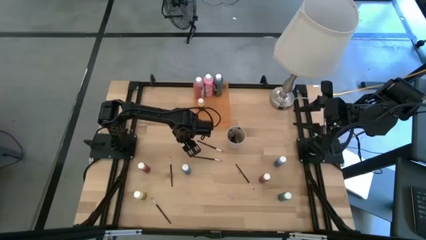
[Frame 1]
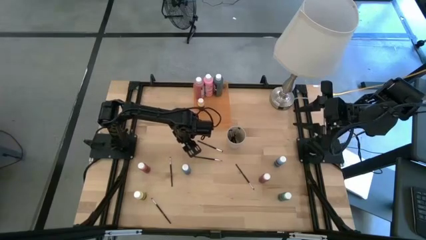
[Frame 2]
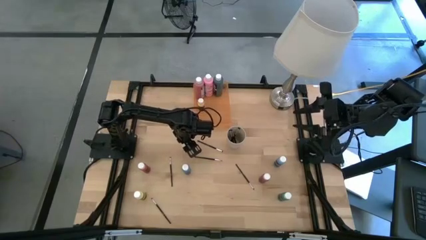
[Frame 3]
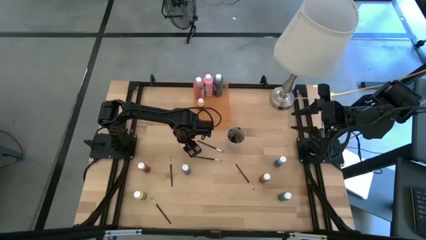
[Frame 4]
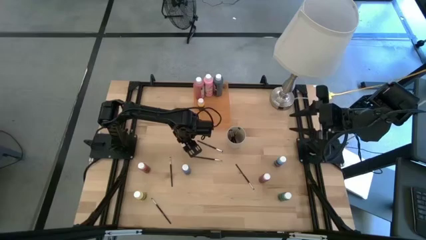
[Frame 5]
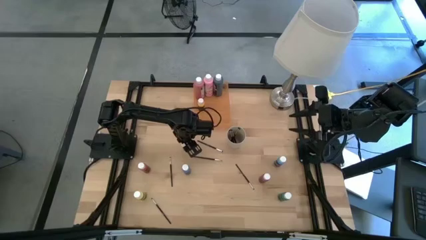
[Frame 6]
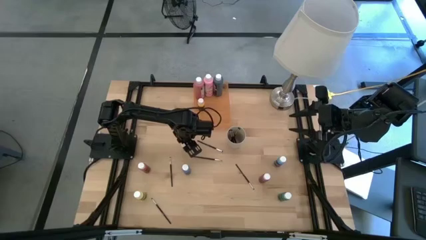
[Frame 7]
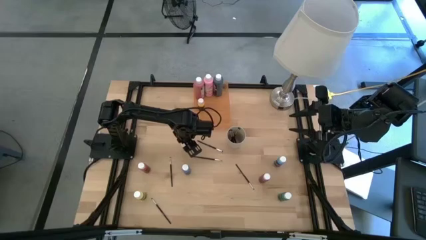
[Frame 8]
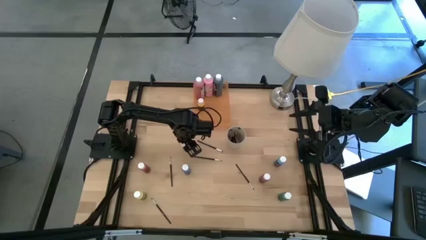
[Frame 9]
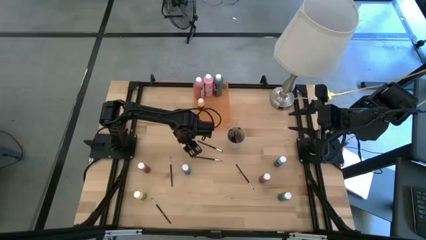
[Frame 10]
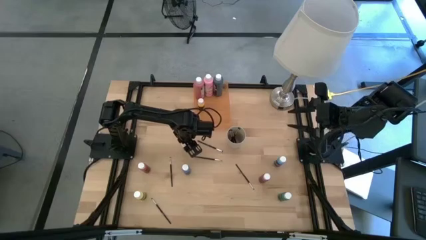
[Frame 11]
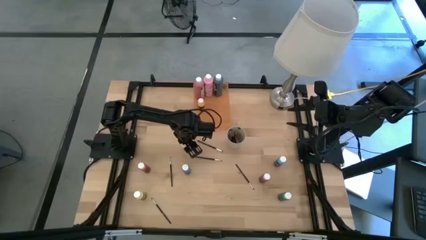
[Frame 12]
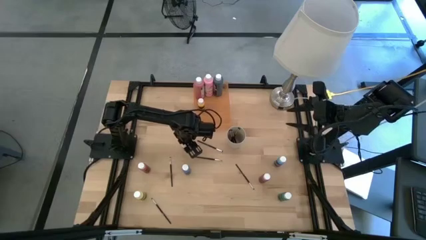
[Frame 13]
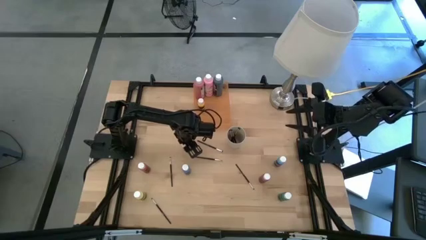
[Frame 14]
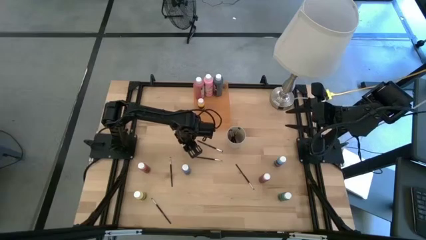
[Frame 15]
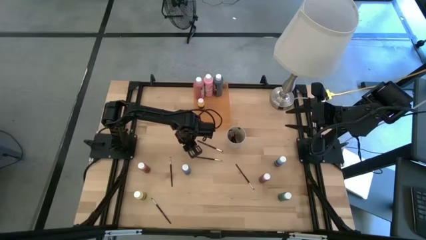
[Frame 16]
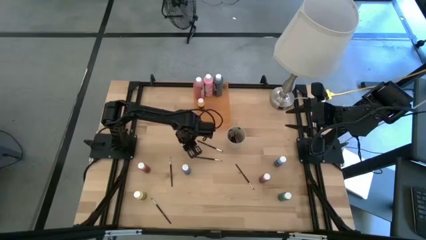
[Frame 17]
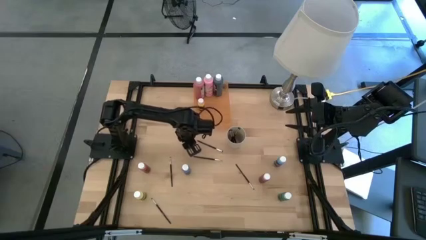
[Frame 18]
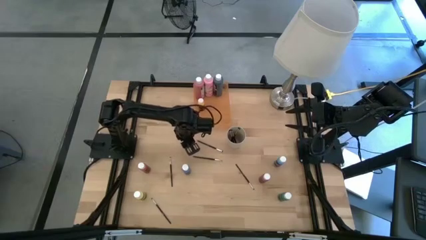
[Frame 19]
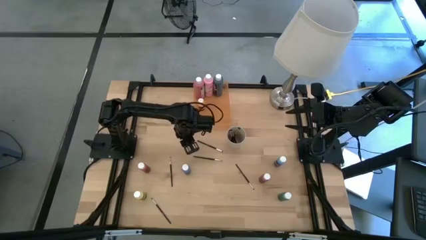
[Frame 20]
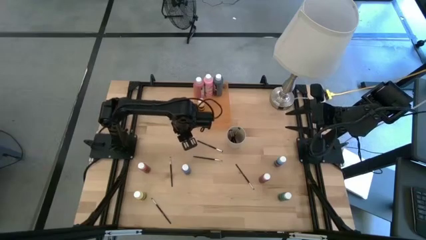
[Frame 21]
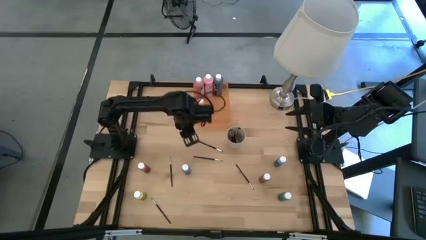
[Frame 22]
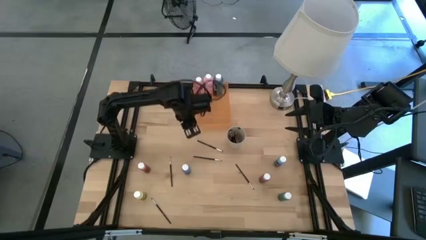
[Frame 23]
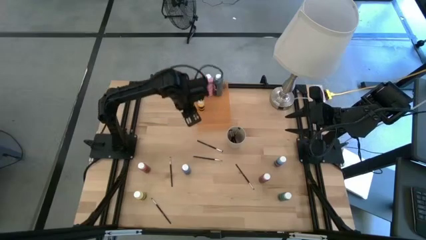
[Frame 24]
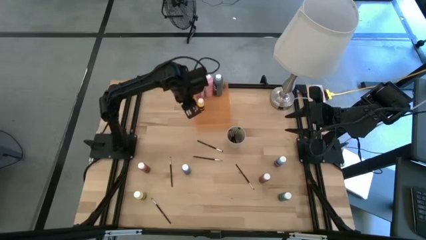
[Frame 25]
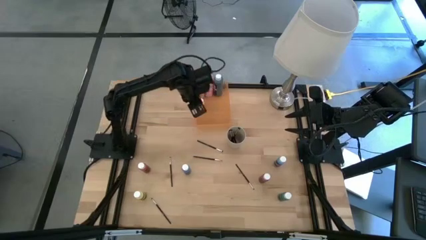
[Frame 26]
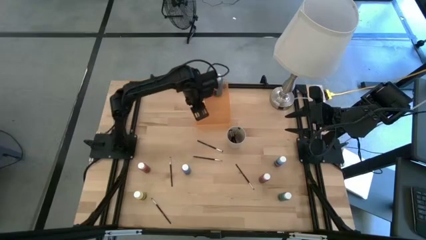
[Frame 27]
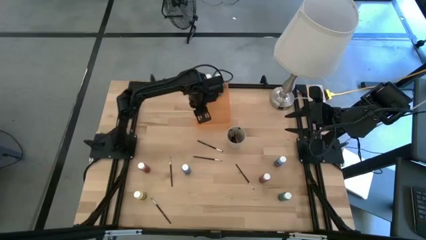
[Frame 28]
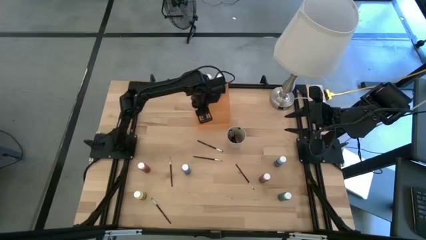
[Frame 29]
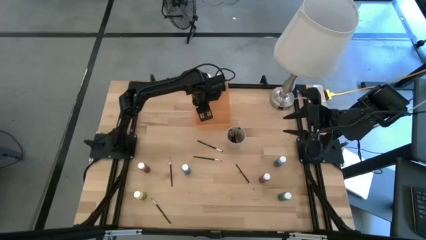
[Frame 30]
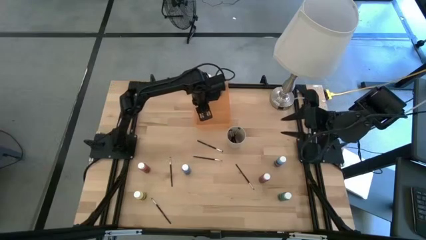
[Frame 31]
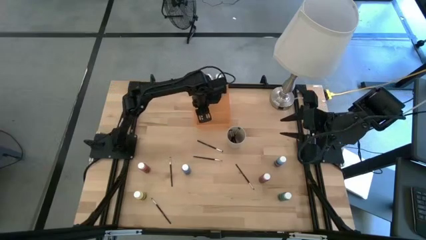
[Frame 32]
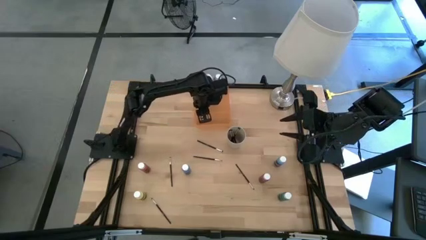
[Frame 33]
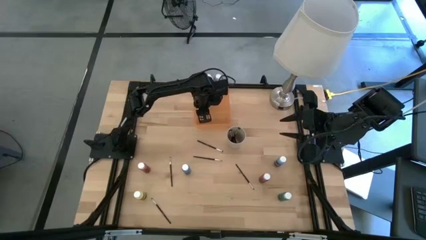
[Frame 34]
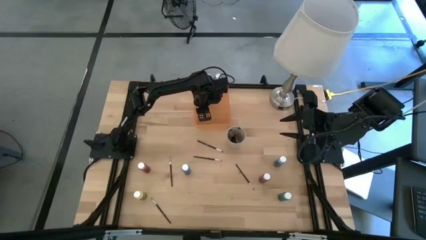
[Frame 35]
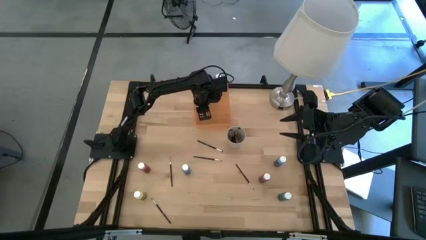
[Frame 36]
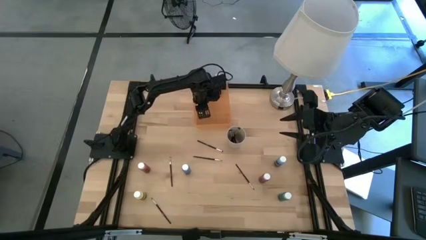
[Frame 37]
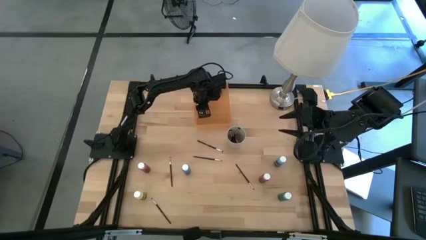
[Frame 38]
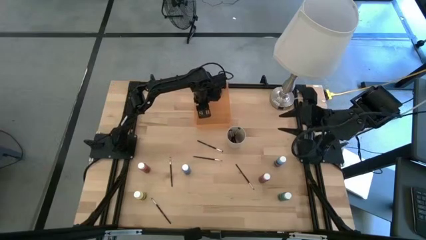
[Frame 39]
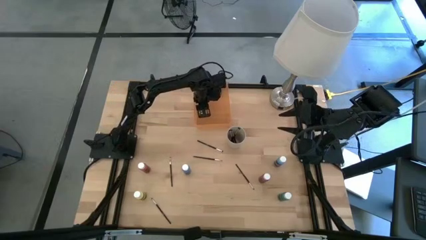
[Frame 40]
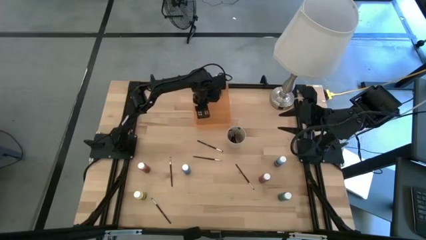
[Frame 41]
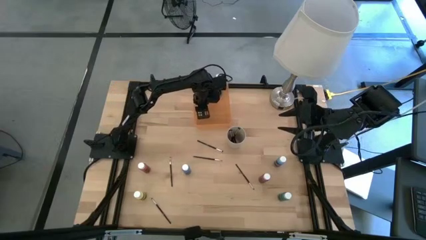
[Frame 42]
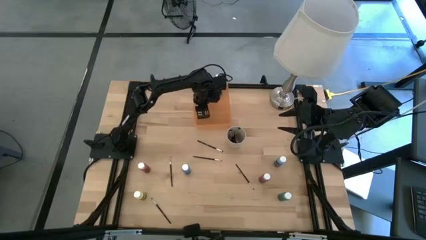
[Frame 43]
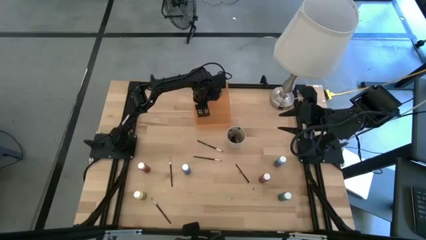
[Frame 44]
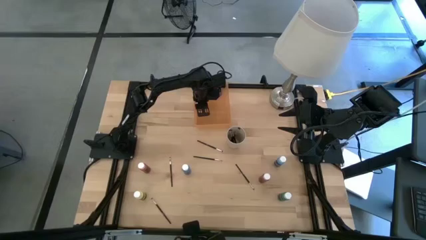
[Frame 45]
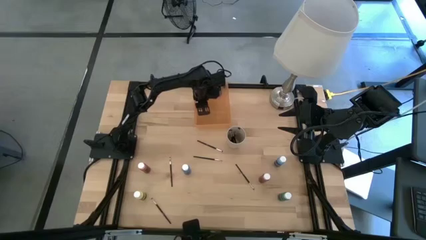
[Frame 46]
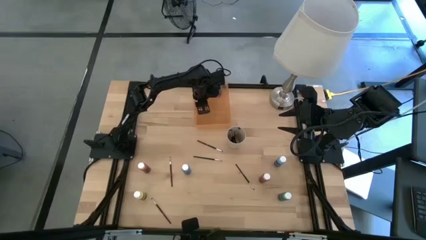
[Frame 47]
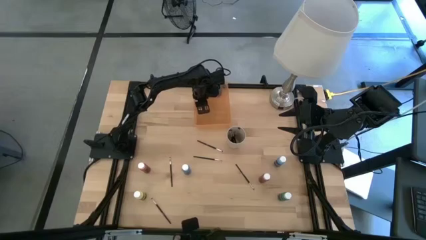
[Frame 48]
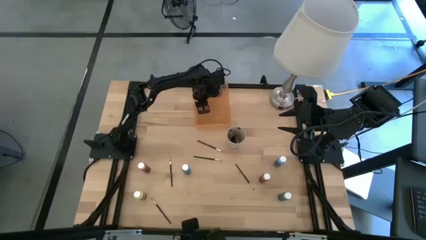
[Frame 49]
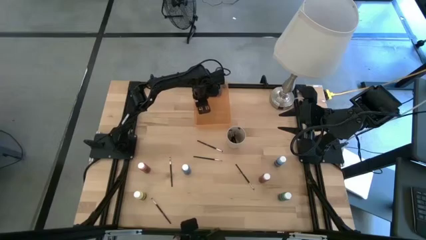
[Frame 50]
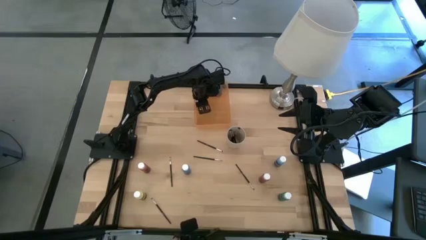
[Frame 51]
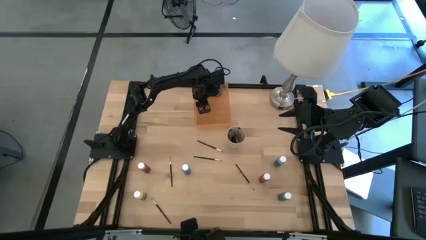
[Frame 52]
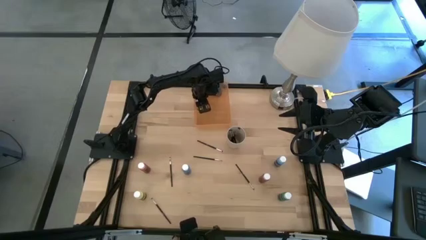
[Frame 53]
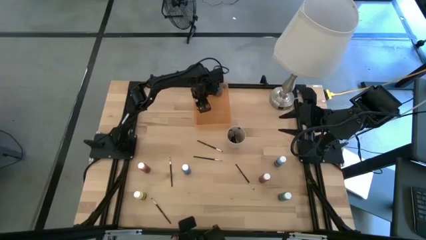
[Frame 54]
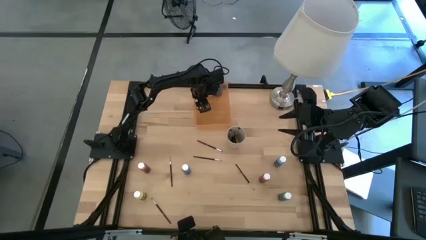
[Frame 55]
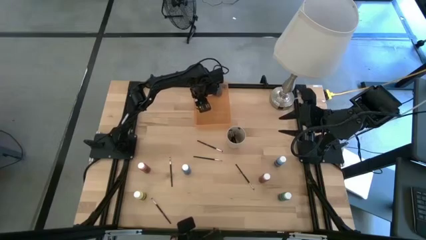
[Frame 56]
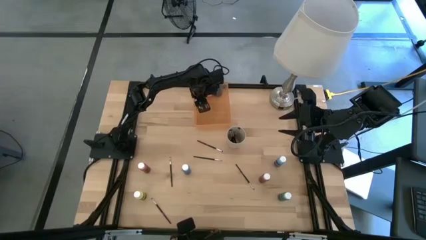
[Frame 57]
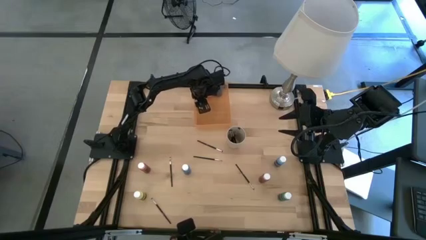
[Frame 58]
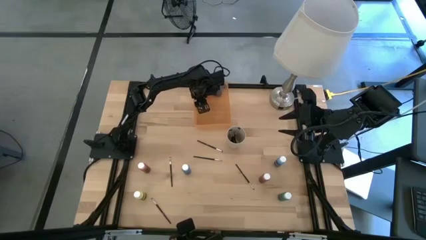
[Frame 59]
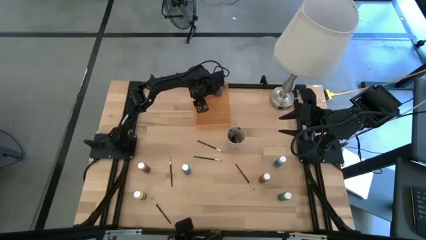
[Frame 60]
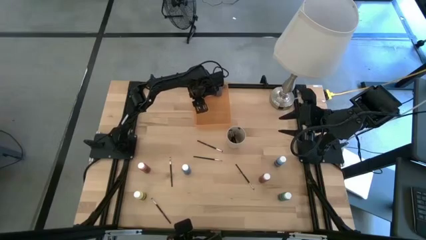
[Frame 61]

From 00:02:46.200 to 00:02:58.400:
Task: Pick & Place Paint Supplies
Put the light yellow paint bottle into the orange bin

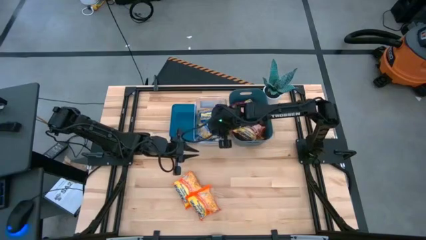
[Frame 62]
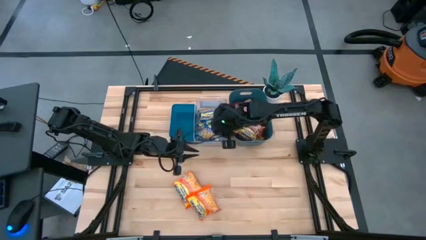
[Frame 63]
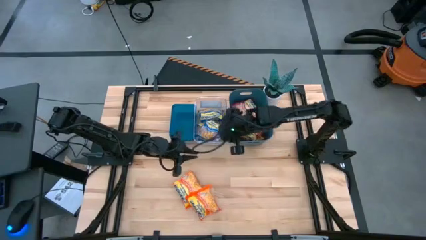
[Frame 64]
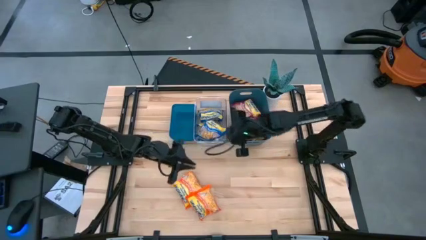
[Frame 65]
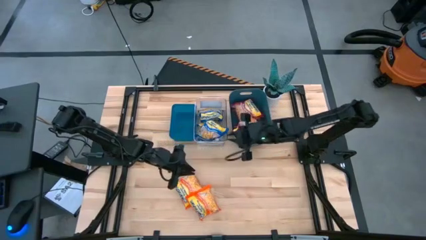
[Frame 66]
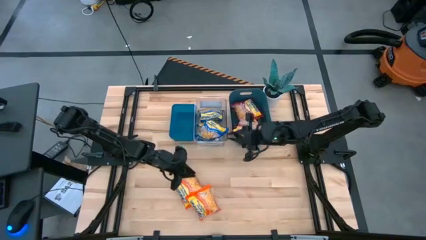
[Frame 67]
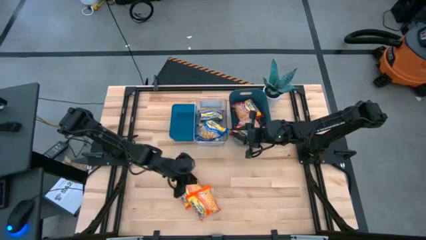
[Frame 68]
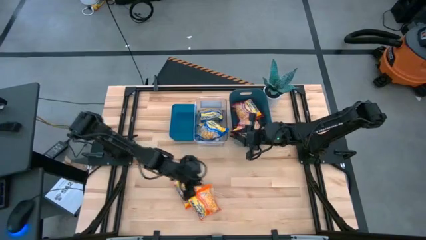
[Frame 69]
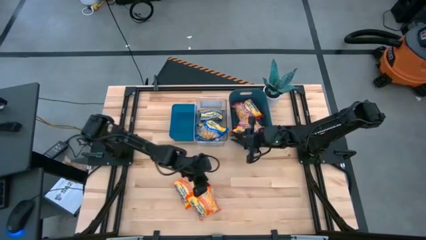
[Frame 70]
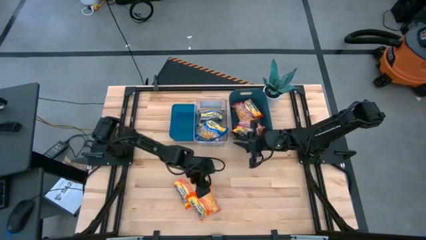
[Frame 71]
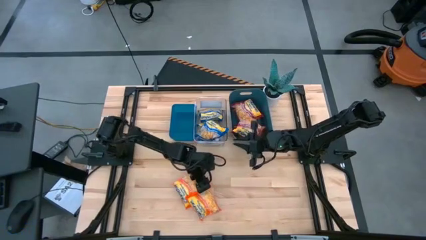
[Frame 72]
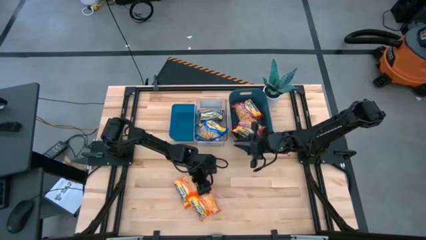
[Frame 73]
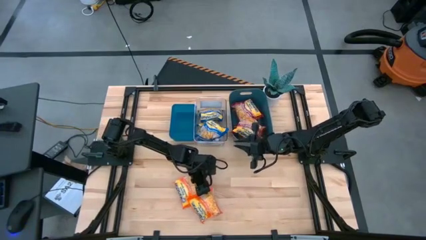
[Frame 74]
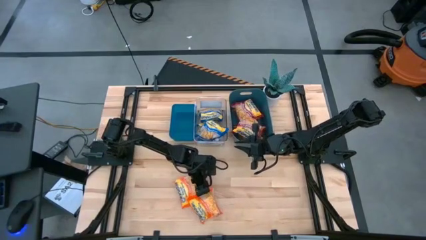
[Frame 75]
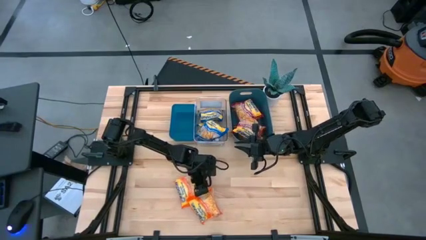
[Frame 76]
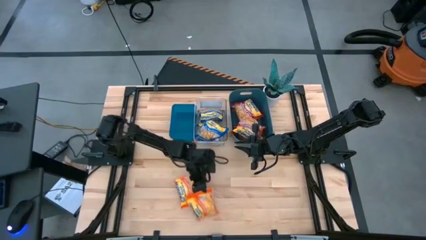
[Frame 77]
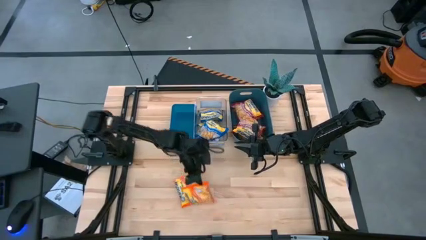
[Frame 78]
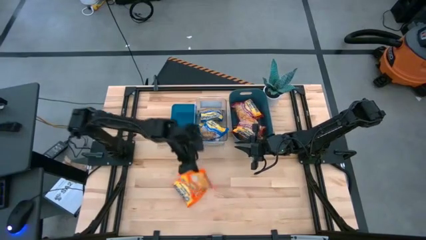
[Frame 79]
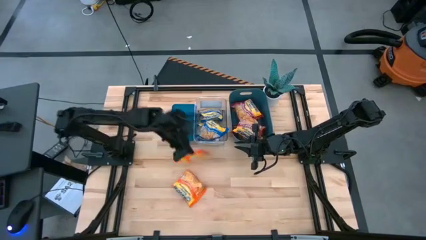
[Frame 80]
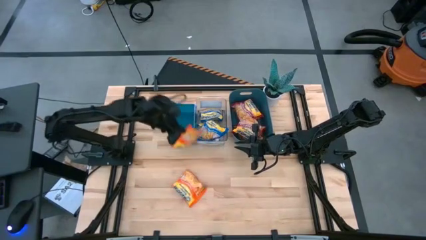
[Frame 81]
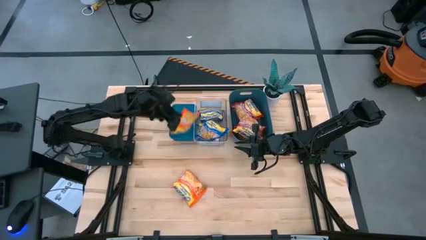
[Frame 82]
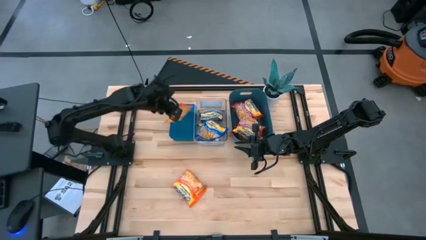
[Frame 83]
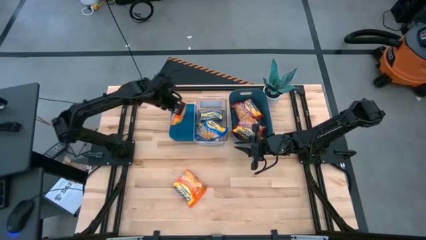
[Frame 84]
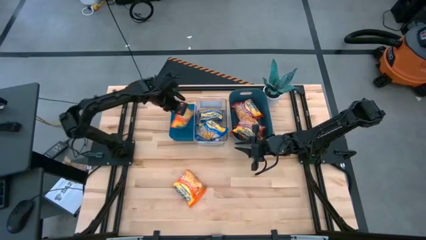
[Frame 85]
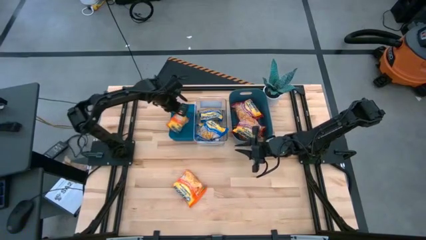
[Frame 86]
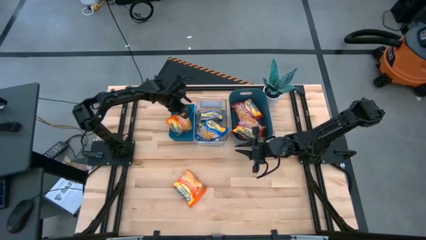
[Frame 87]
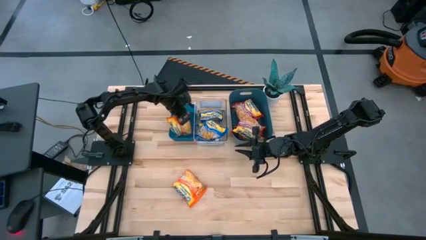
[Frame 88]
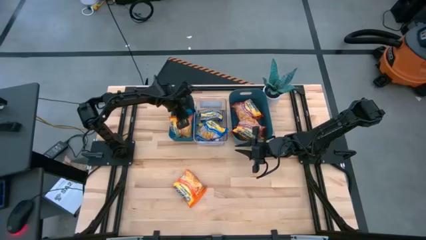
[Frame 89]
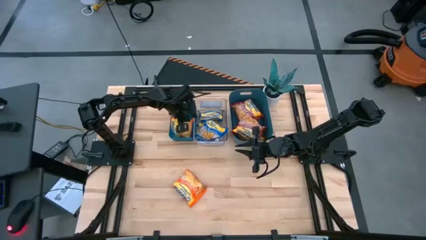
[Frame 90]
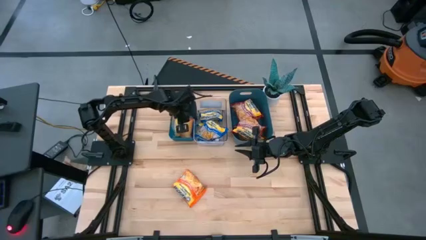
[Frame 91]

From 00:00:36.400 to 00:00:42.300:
Task: Sort Maruchan noodles
Put the bottom orange noodle pack into the blue bin
